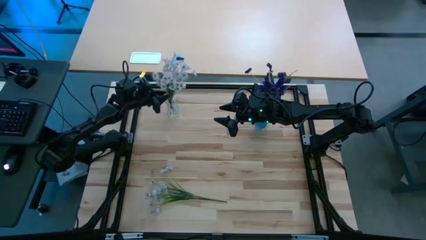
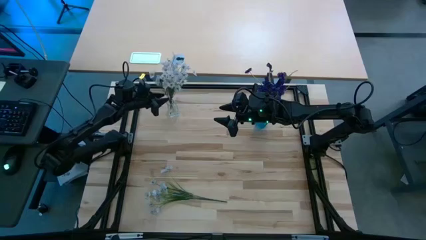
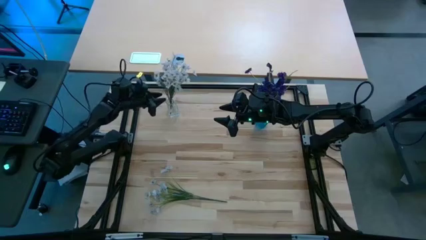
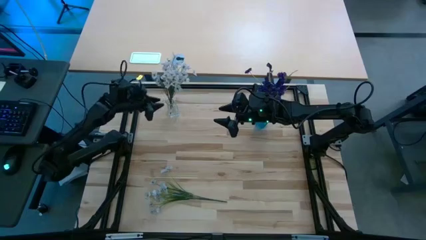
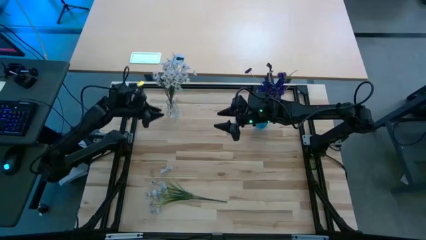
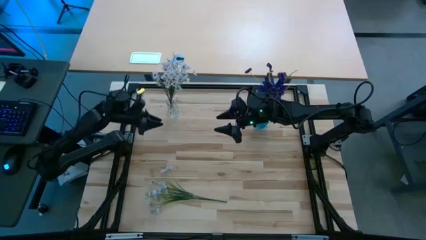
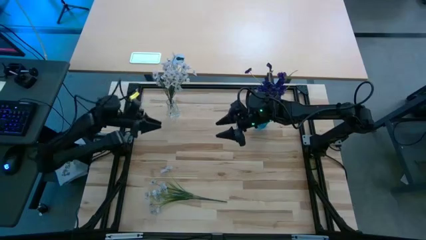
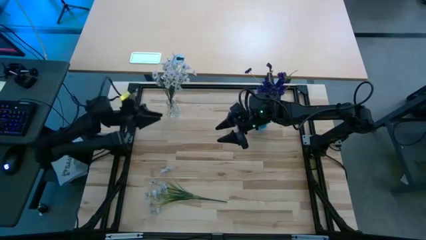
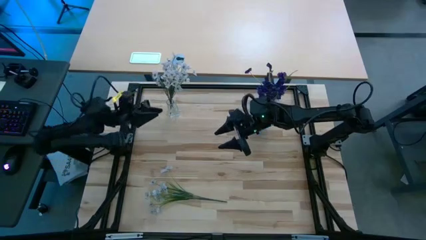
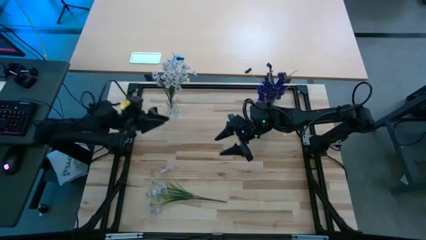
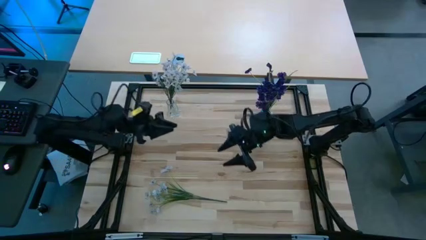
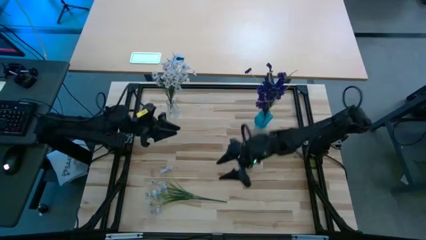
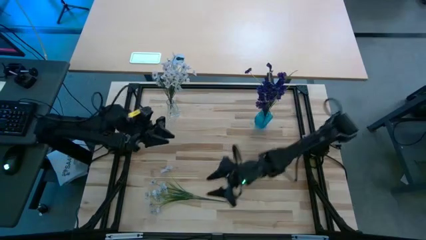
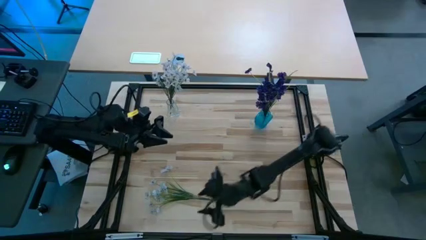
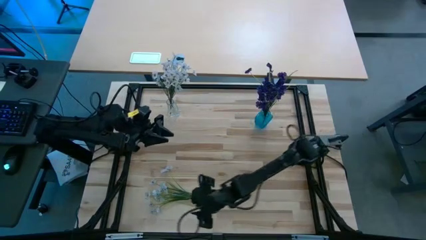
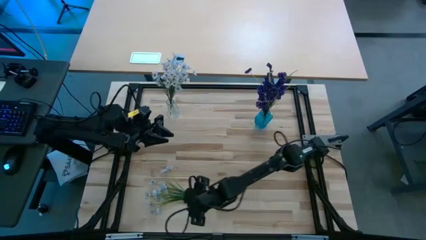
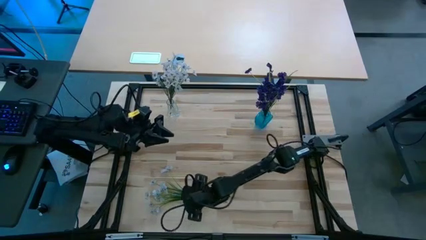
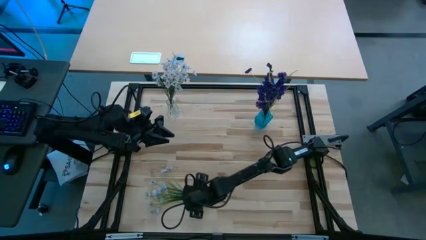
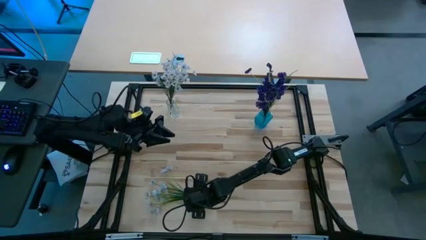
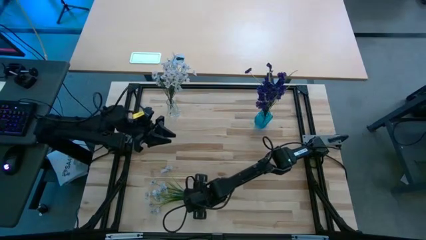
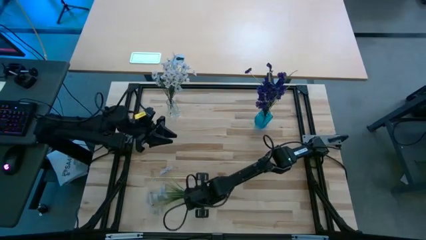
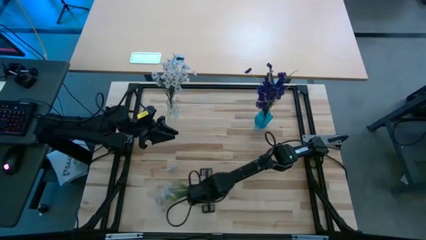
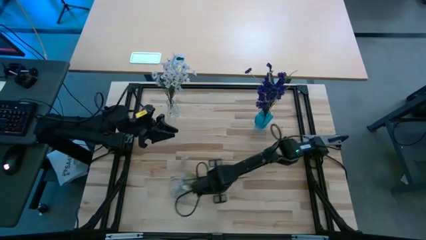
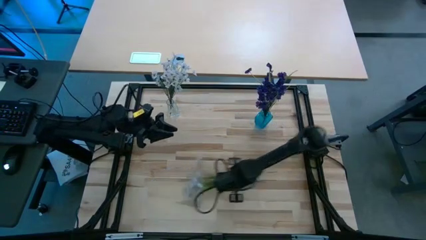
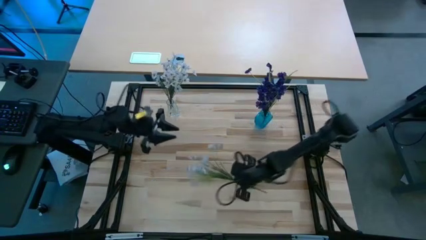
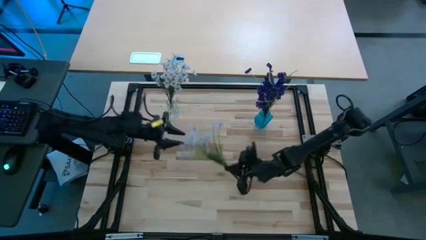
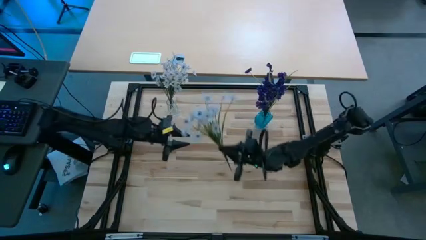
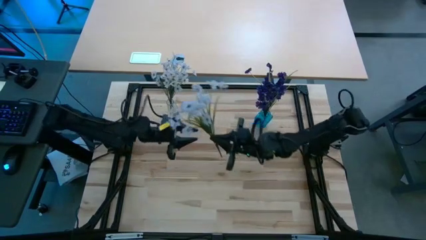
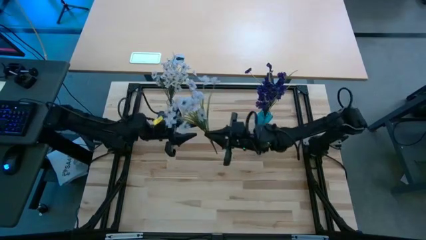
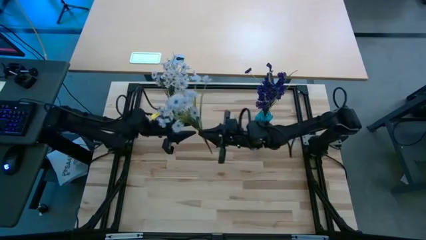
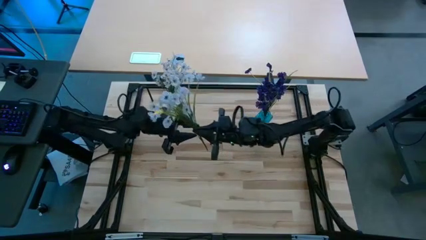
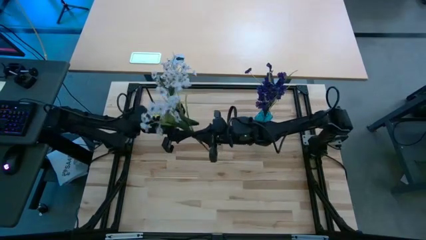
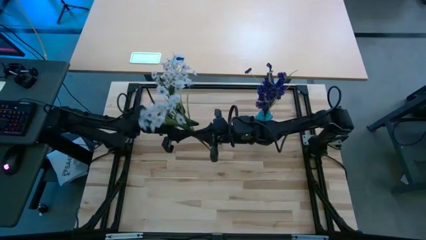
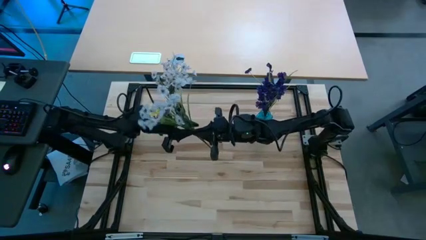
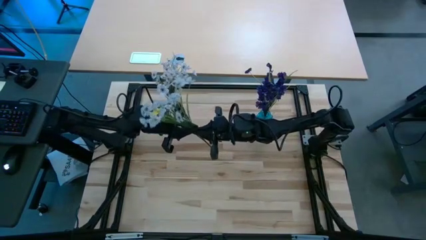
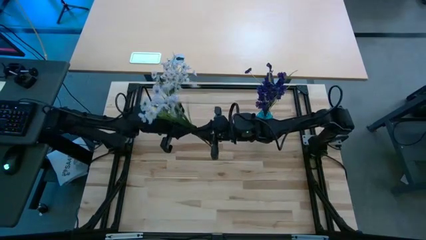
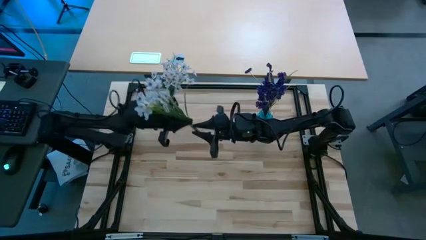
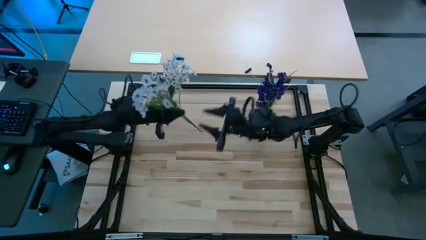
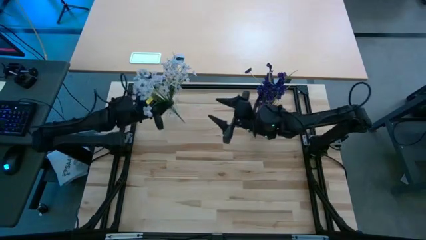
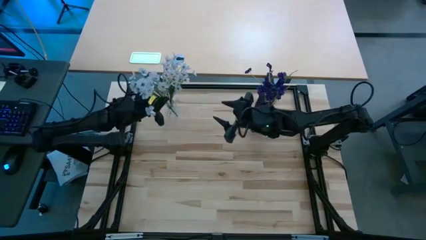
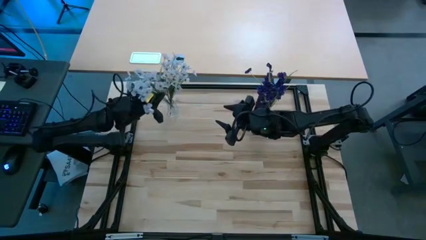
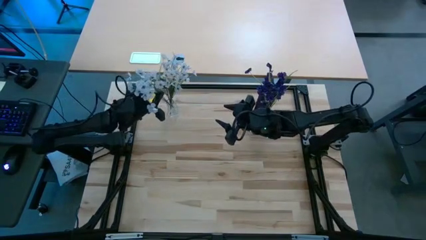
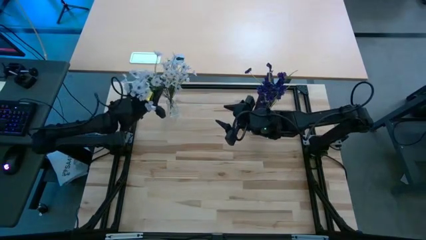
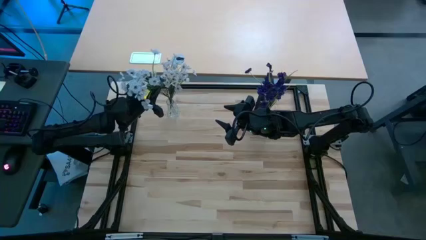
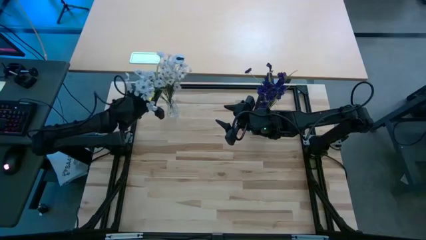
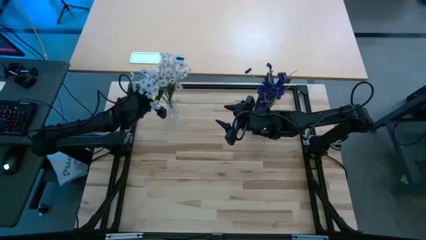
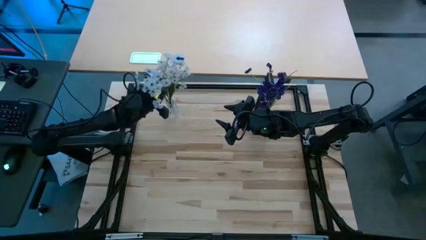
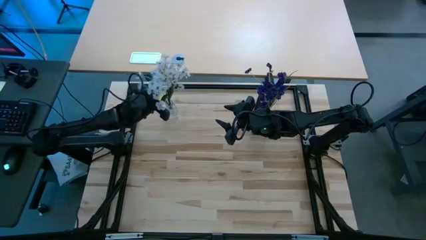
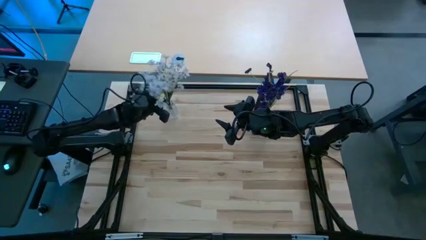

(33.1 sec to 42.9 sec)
Task: Sort flowers into vase by color
Put the white flowers into the transparent vase

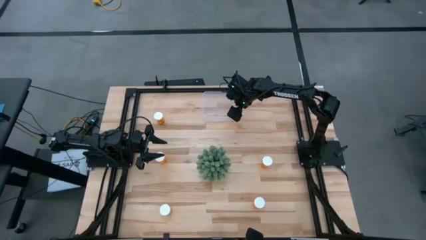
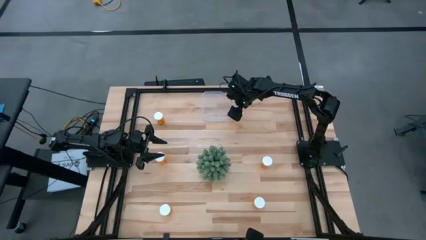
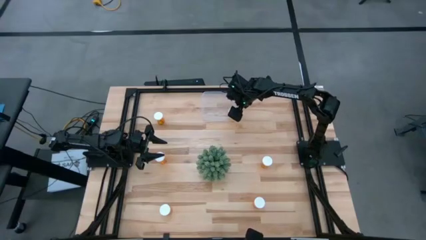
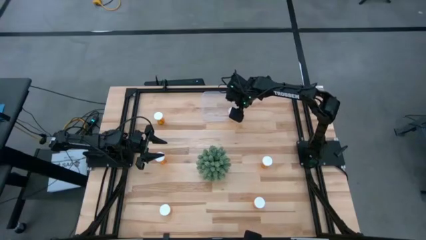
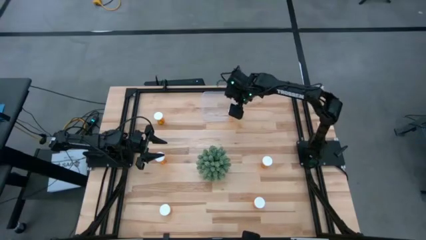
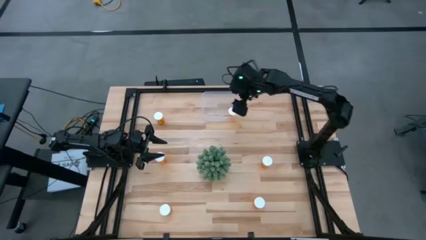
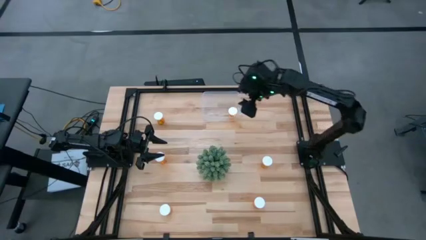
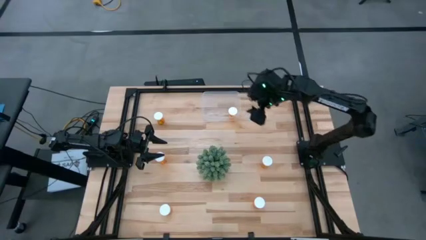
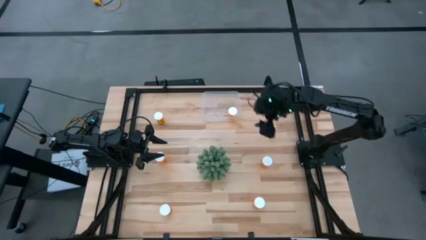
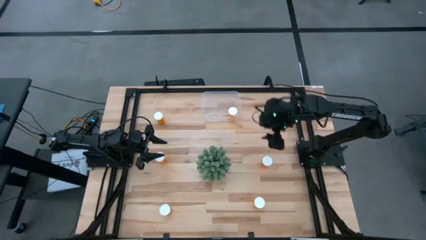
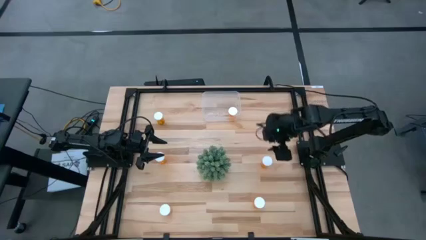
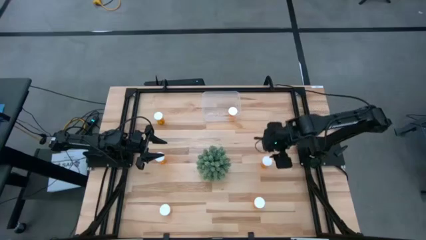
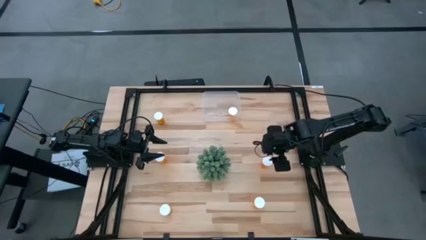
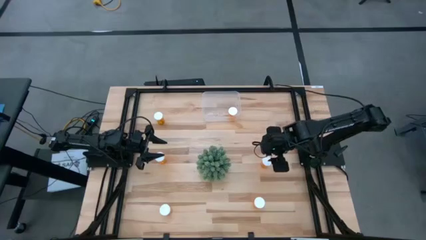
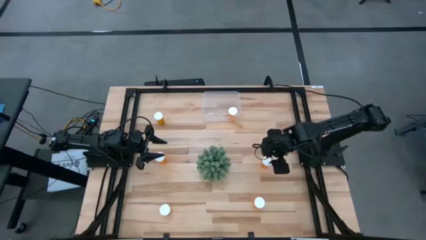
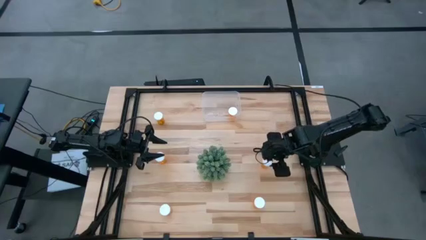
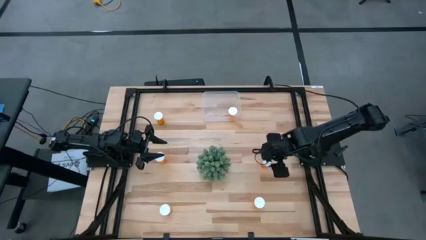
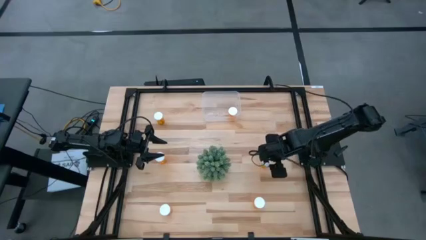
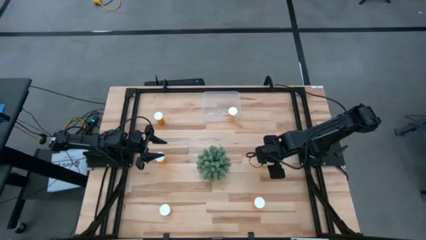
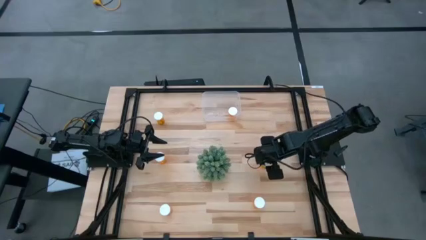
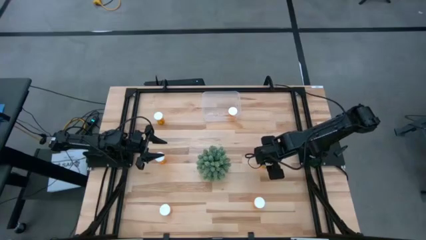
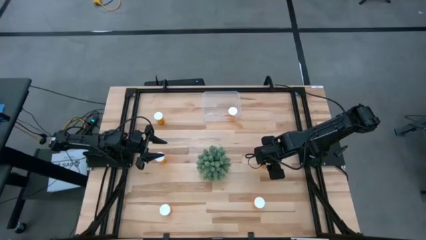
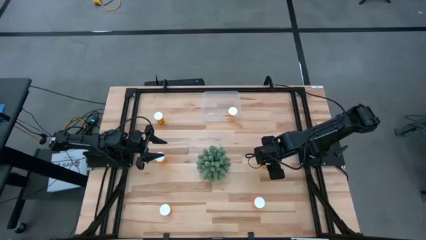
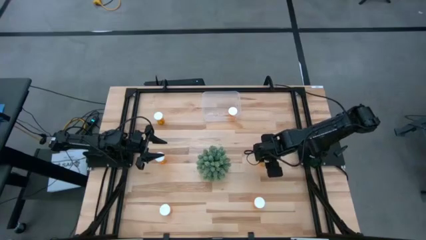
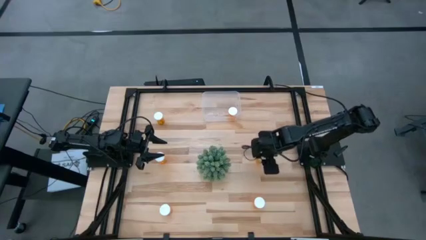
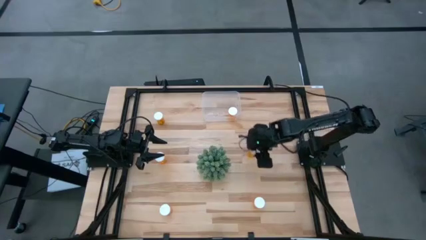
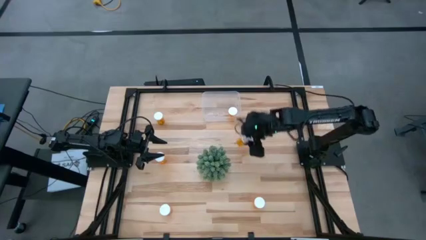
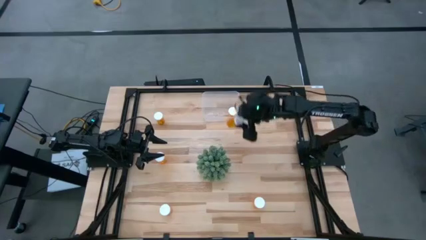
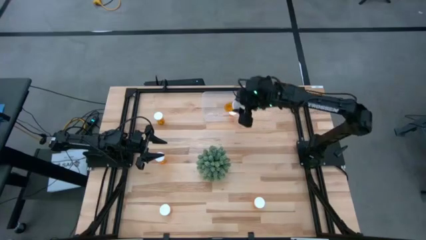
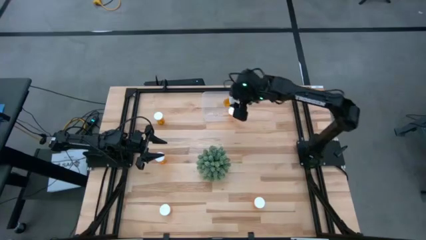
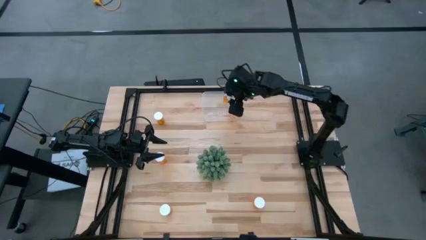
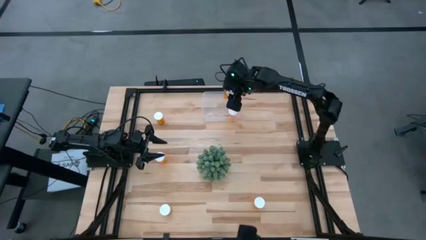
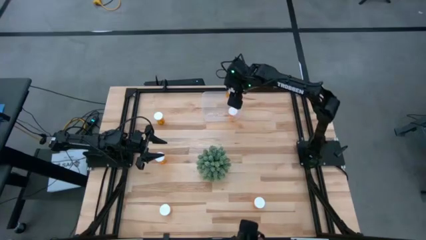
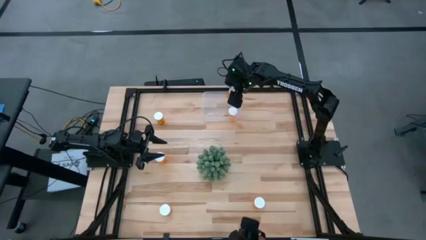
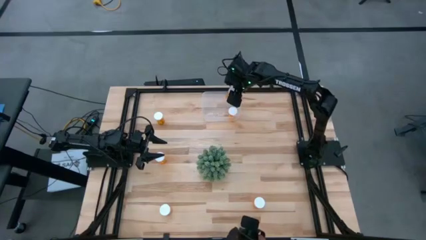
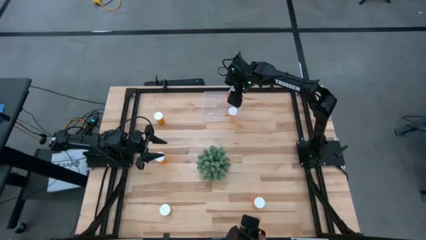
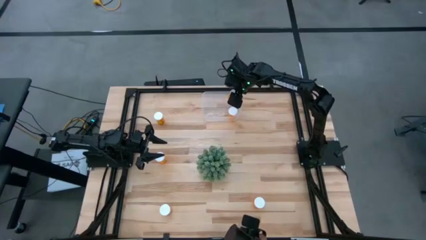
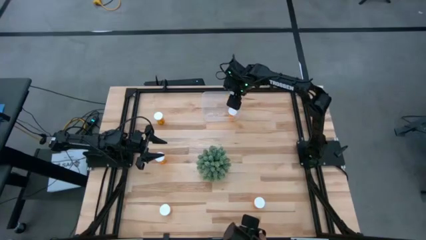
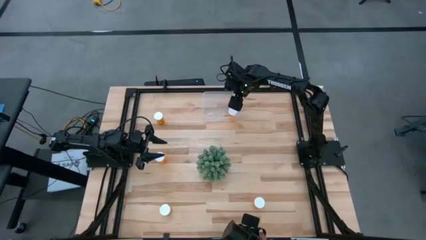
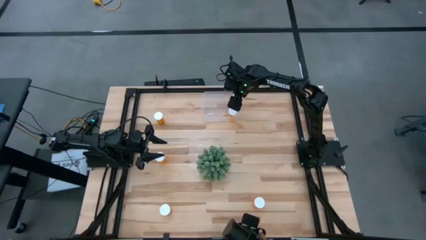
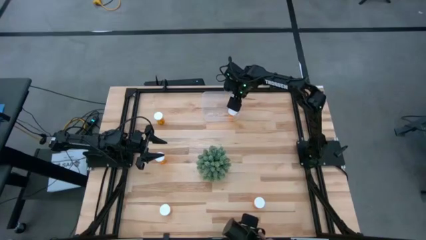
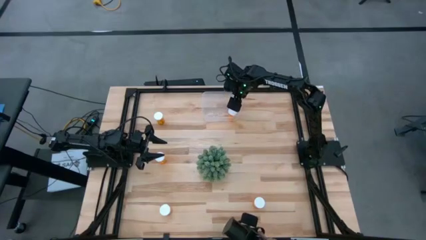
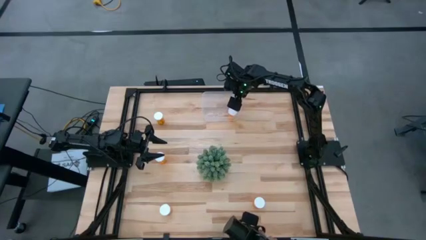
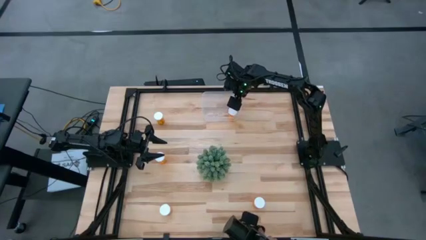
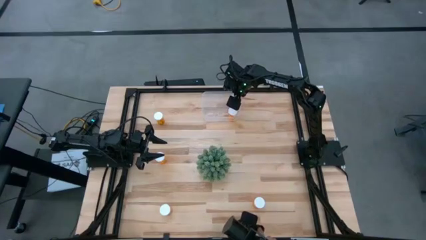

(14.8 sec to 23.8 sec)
Task: Pick and place pill bottles into a basket
Put the orange pill bottle into the transparent bin
